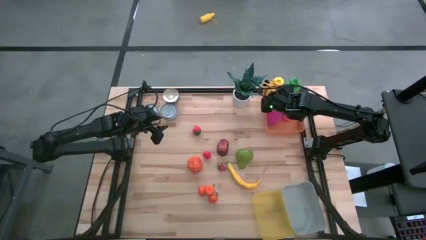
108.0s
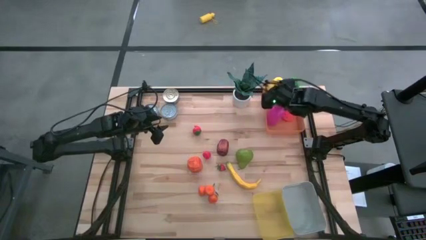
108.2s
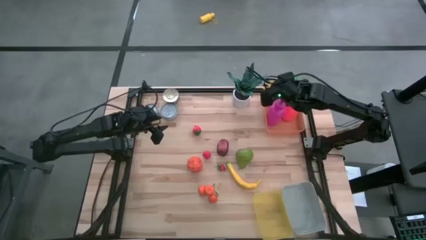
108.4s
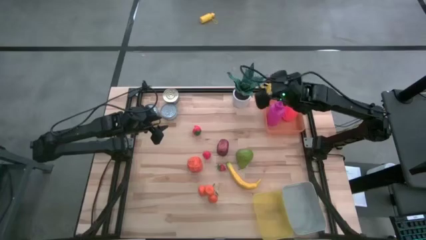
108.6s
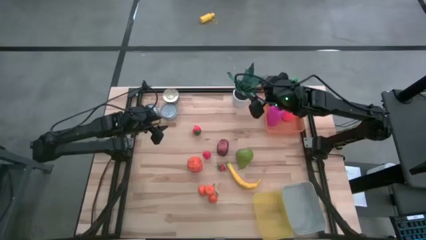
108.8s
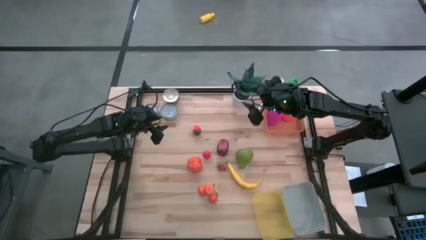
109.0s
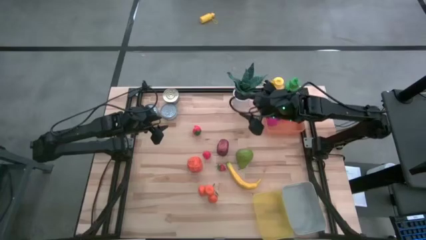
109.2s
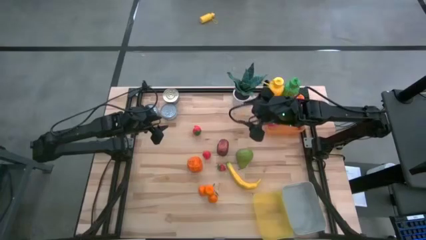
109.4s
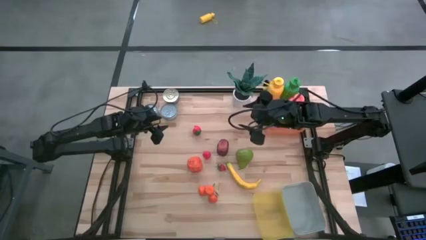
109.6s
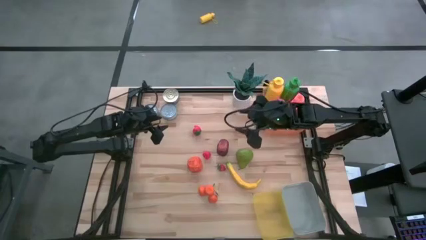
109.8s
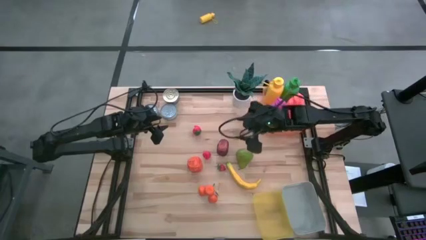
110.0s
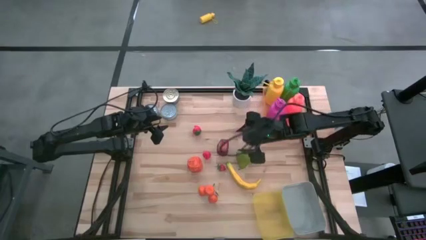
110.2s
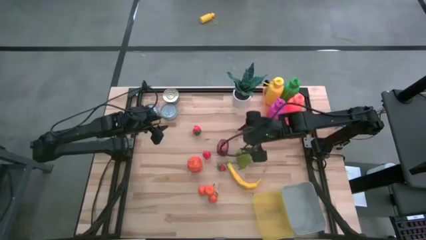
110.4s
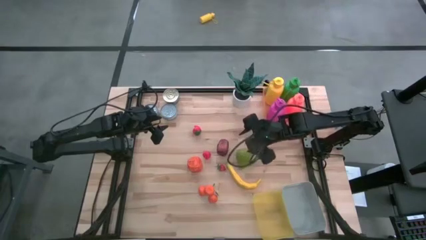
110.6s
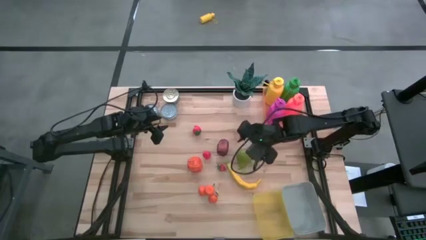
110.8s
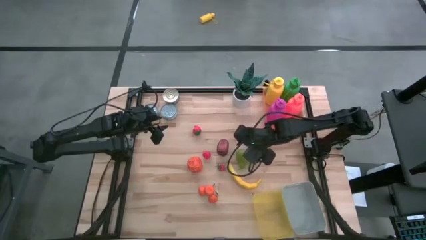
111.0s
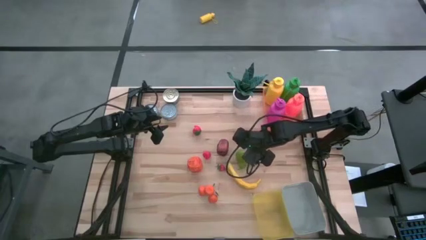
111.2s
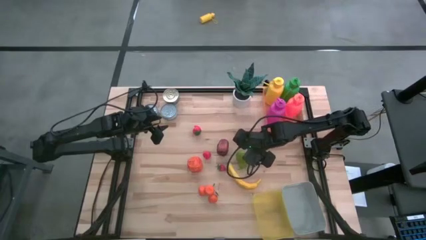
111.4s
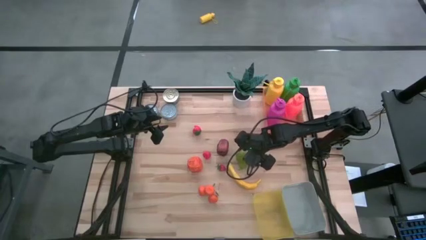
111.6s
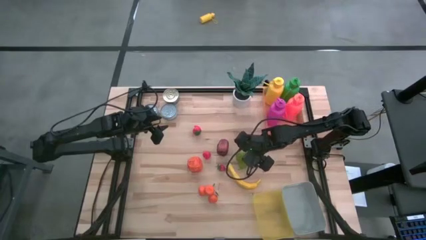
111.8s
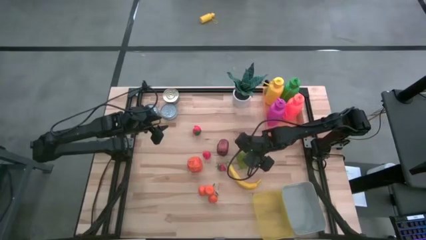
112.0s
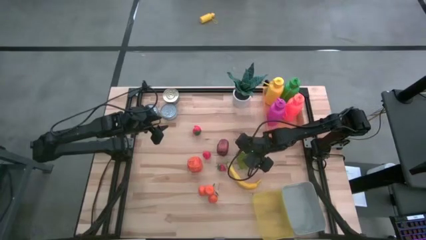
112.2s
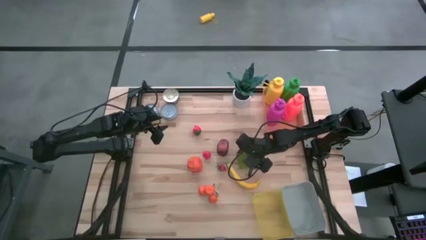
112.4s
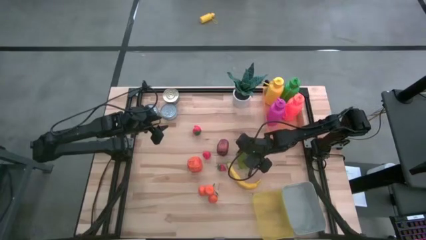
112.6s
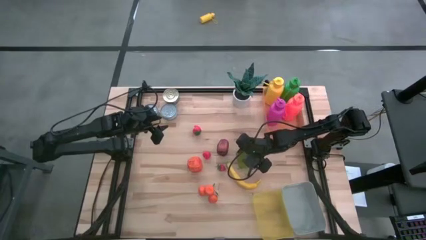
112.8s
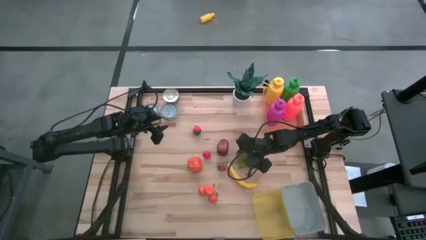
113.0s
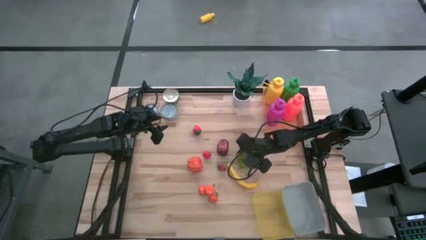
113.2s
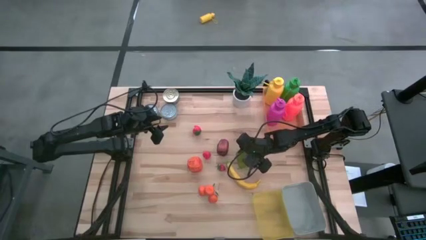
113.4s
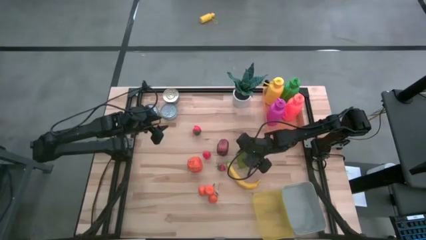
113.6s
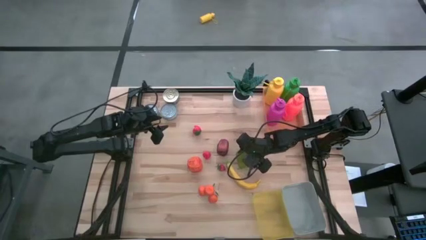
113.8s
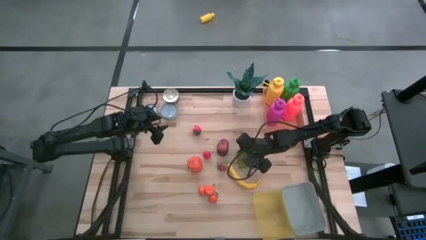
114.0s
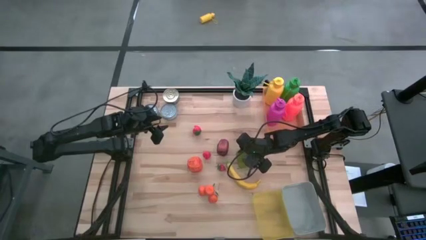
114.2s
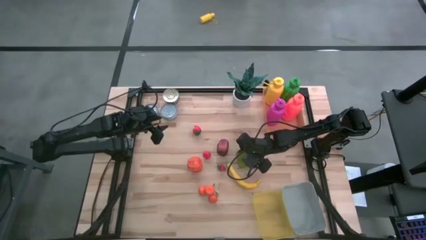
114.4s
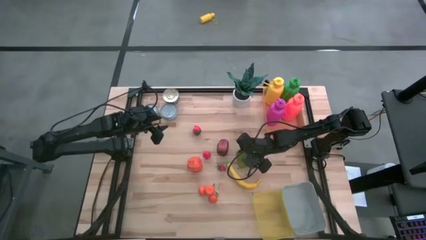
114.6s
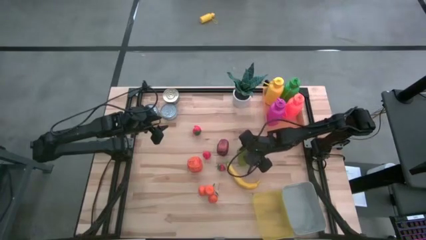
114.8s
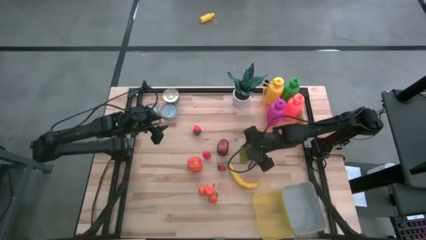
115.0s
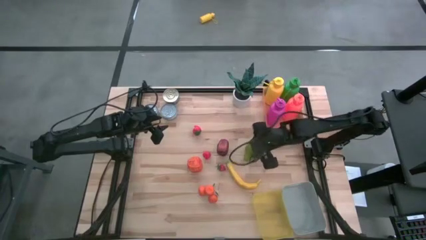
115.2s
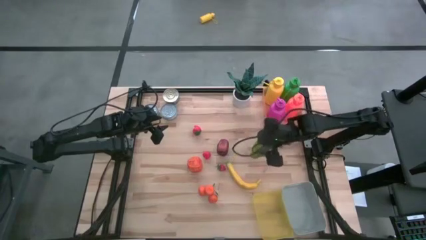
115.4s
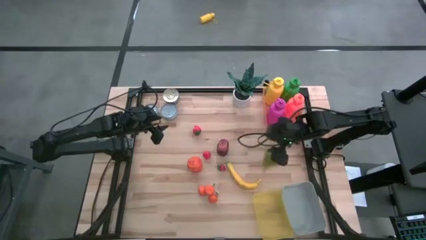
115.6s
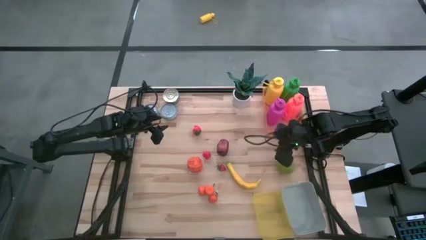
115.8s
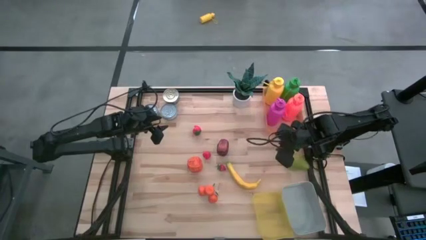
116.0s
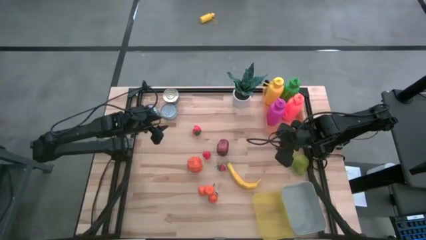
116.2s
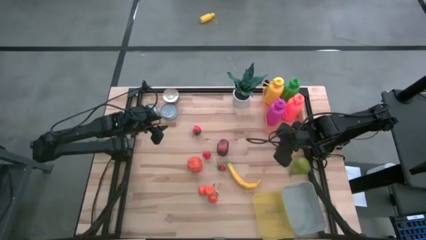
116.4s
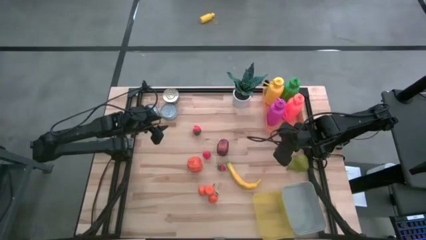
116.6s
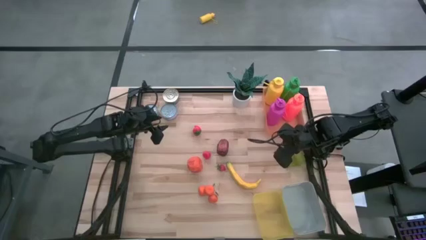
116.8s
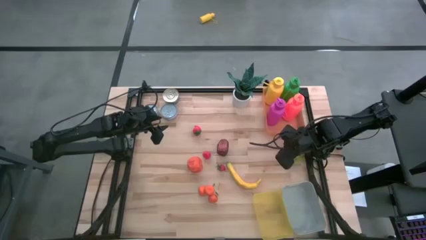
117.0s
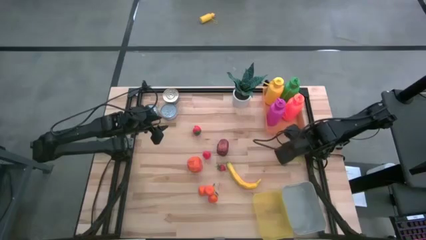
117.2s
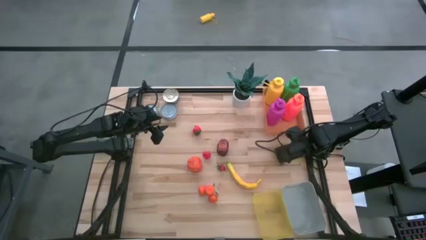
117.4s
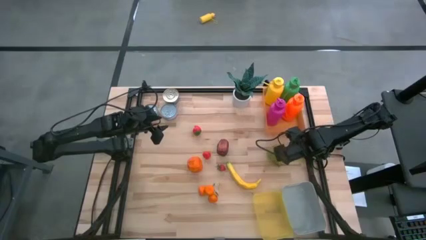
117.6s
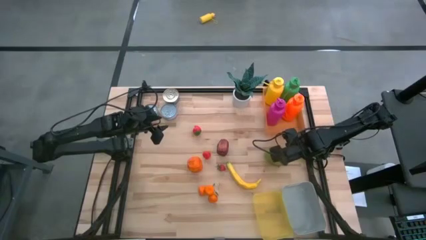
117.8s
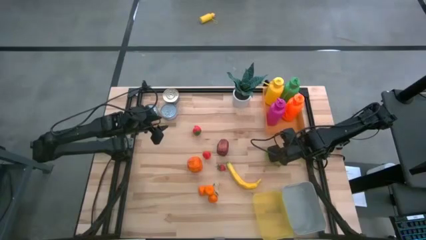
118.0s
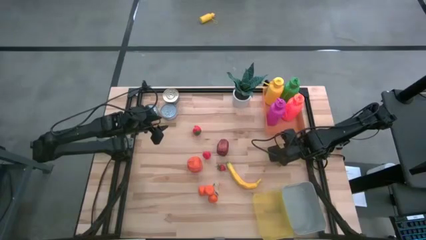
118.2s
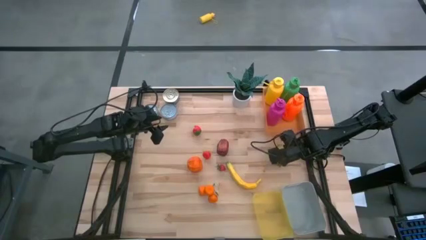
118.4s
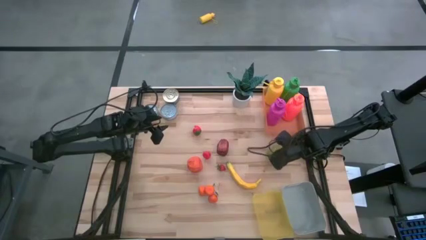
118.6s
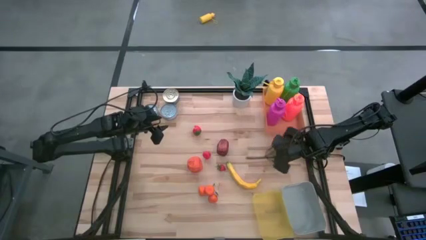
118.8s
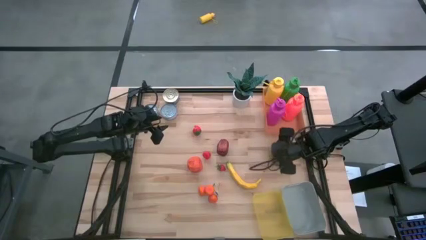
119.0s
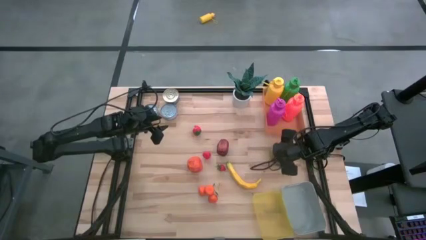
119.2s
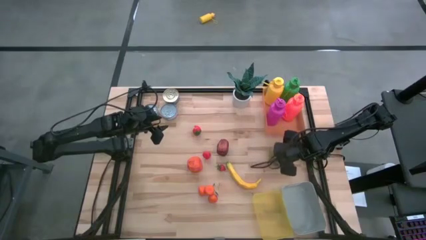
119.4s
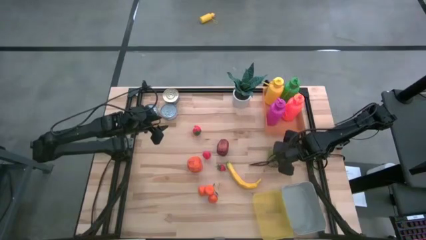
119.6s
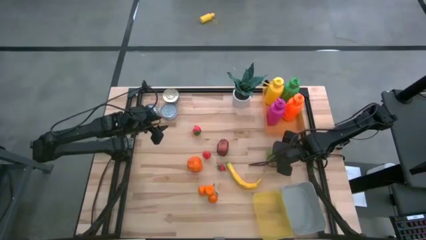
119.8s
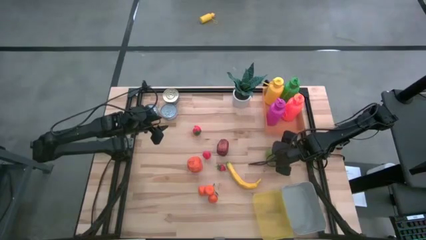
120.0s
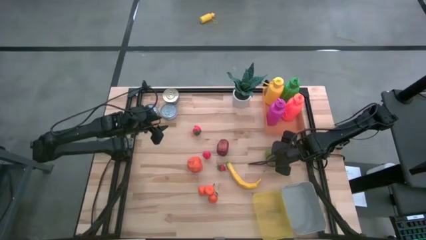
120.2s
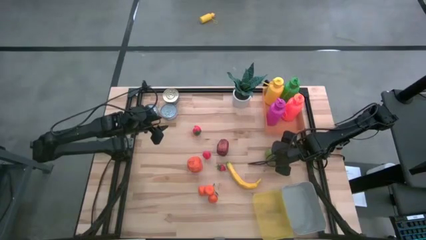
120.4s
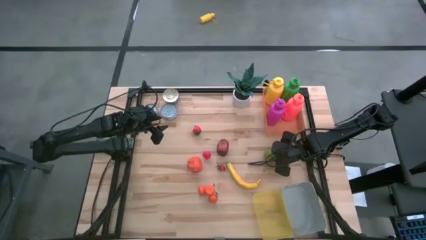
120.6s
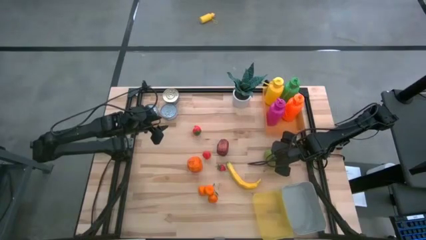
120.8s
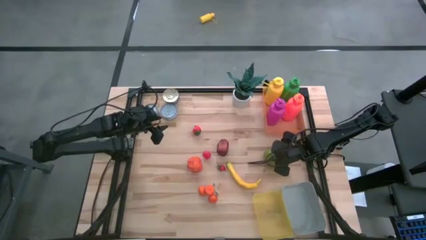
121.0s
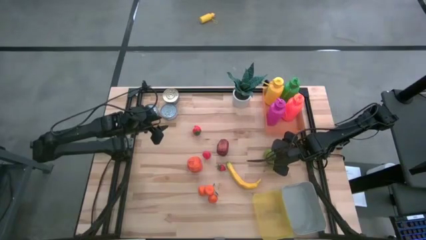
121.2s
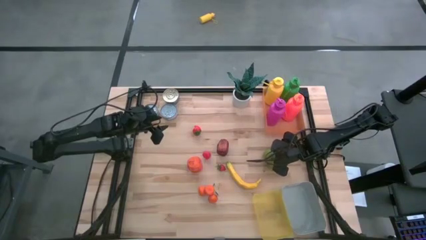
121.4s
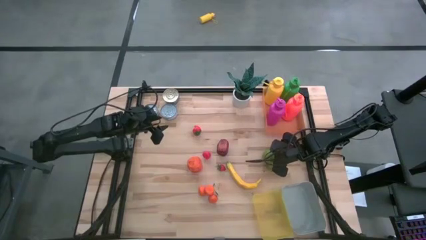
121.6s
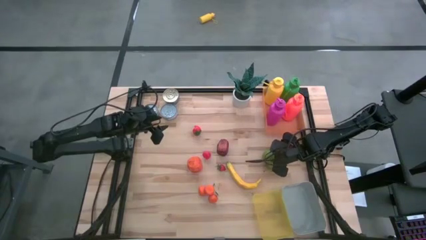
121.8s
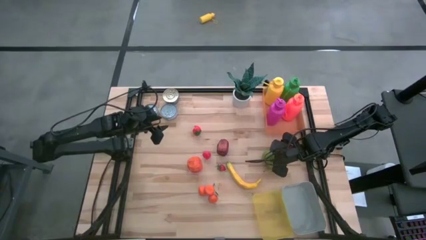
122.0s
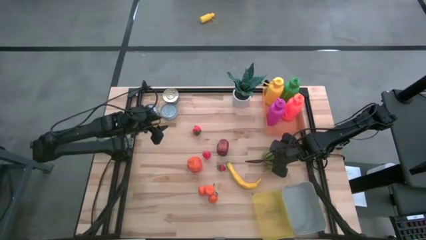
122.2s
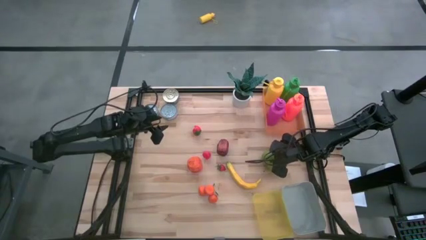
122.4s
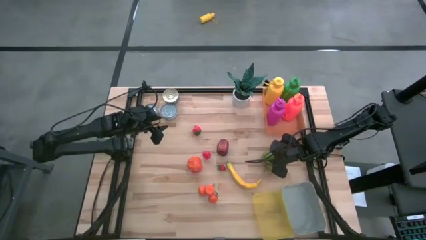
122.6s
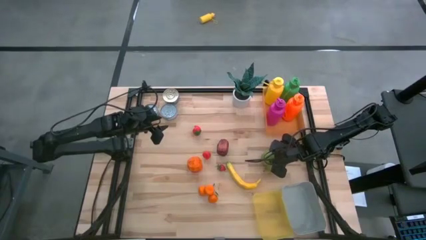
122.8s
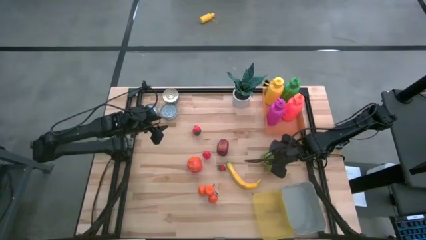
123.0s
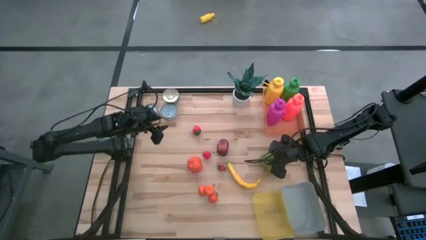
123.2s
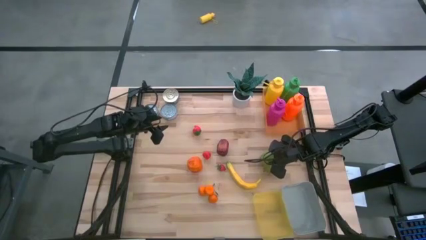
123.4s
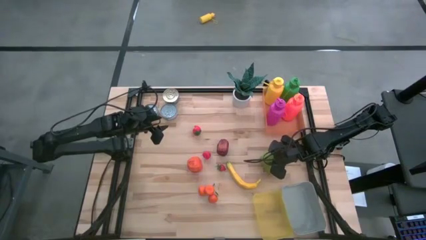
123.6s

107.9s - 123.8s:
Task: Pick & Place Food Item
Put the green pear into the gray bin
